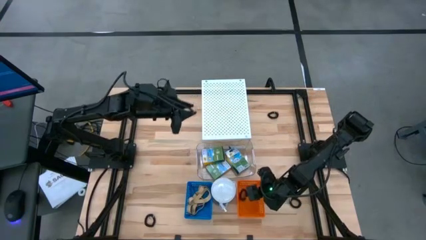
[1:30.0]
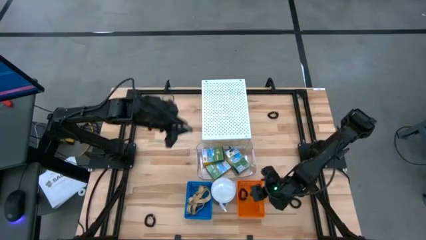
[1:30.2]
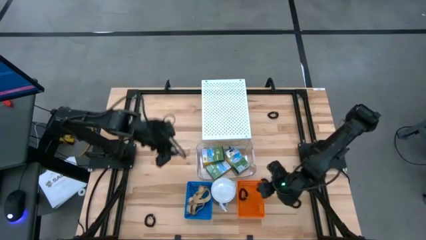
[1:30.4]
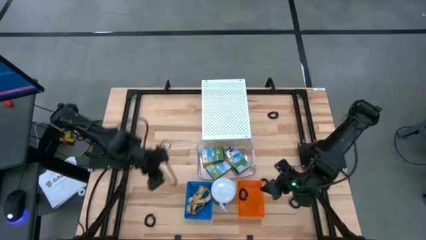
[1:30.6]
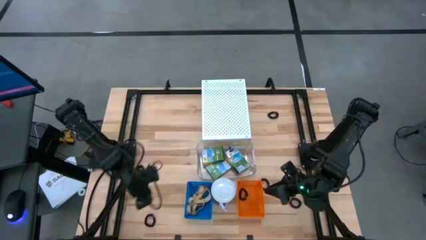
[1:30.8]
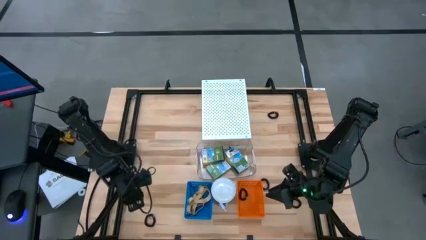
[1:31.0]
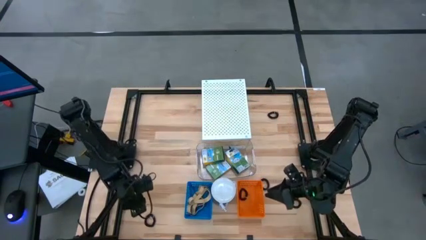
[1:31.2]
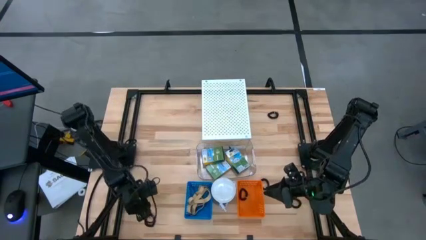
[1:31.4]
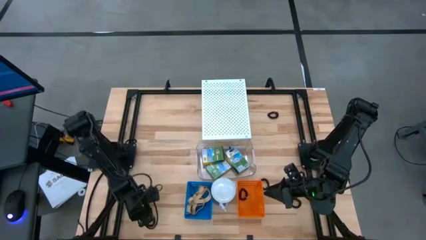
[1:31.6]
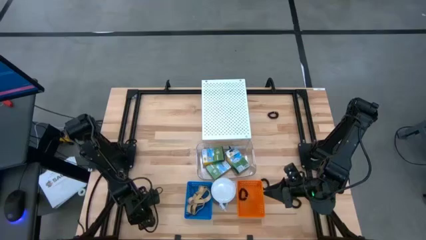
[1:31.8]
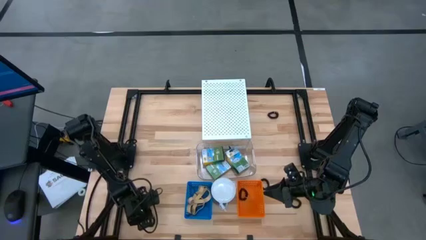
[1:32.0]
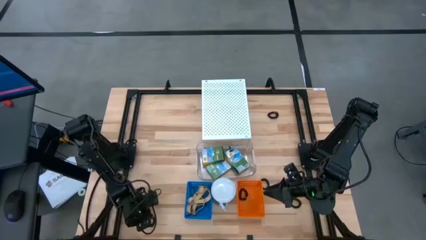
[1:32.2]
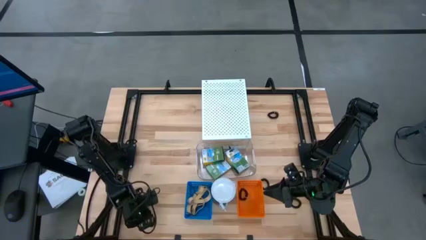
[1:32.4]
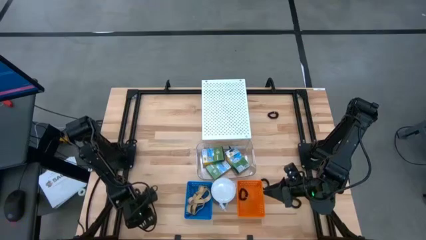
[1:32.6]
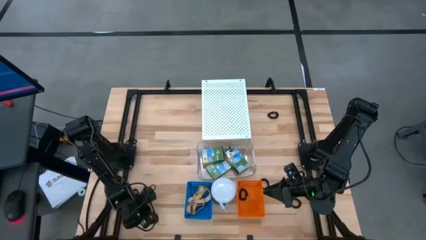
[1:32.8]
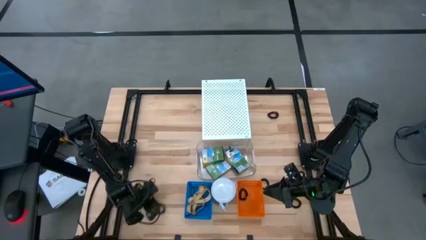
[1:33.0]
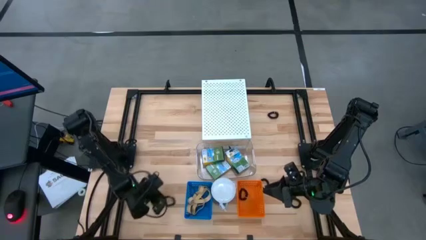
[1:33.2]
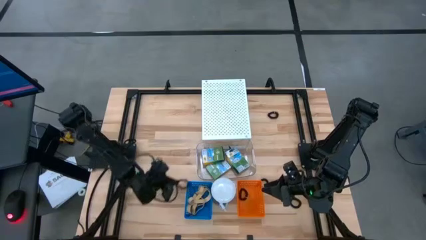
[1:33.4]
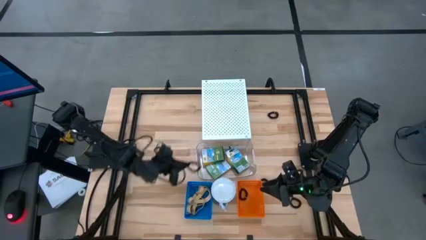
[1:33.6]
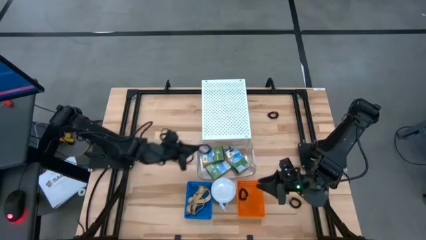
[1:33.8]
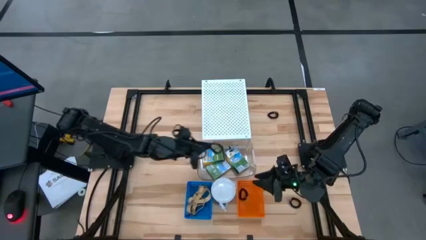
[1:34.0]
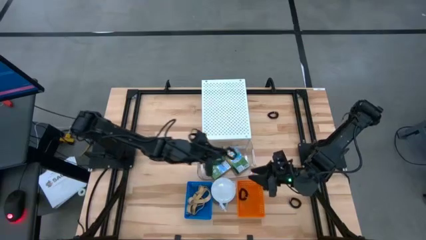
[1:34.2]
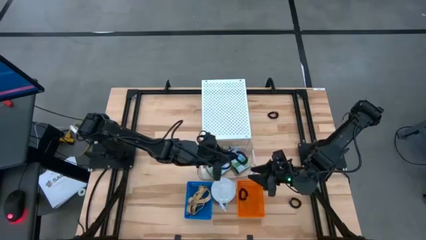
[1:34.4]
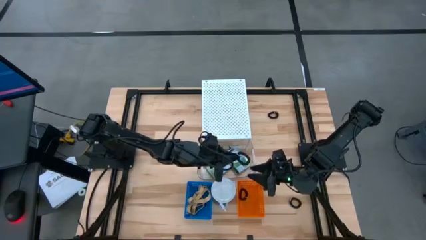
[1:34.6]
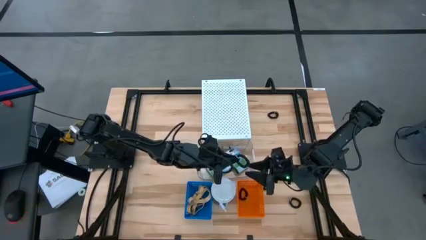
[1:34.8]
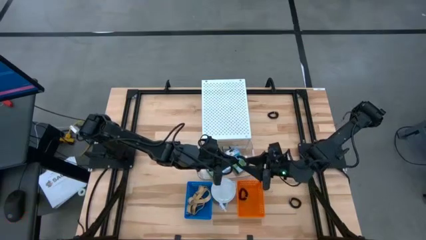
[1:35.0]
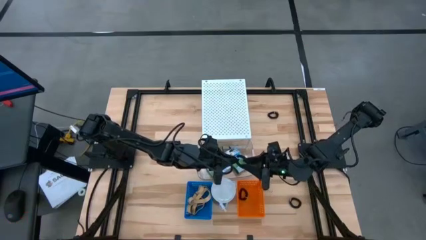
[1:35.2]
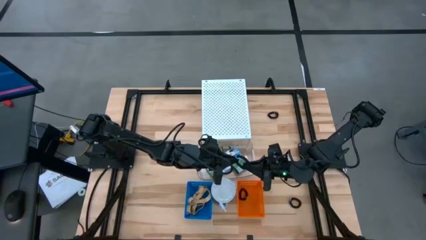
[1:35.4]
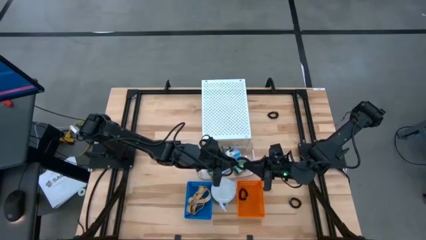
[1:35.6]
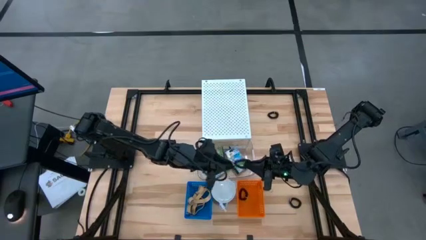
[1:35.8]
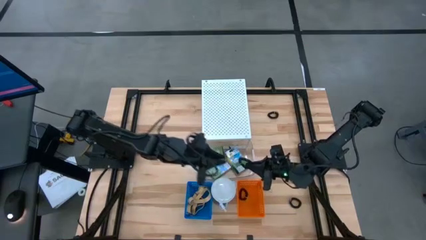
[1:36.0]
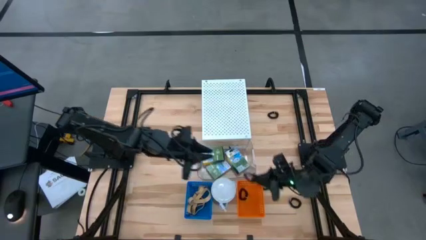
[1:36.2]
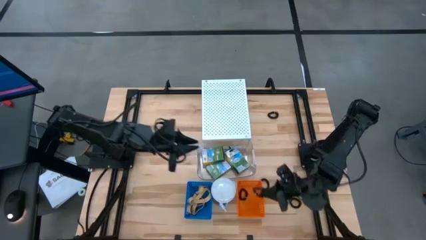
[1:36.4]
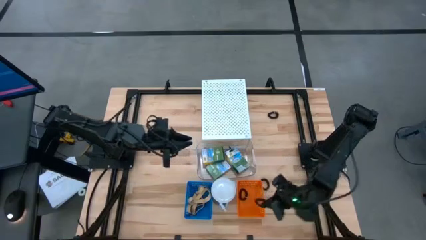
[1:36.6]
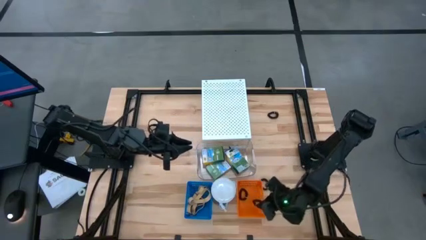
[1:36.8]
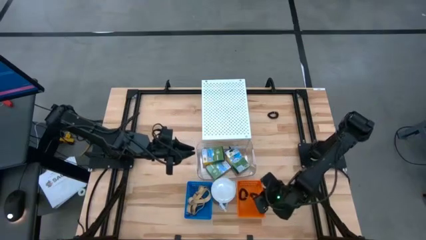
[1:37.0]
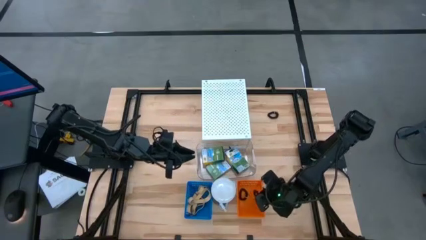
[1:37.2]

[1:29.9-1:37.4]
Task: Pick & Place Office Desk Supplies
Put the black spring keychain into the orange bin

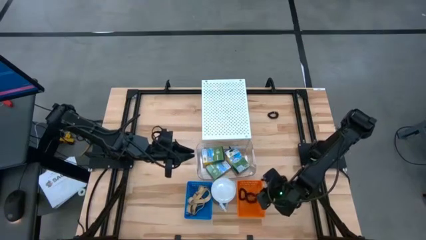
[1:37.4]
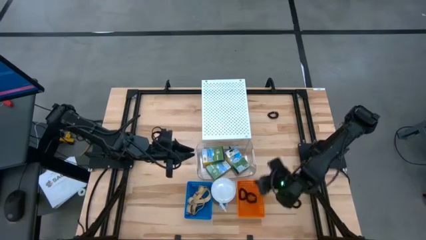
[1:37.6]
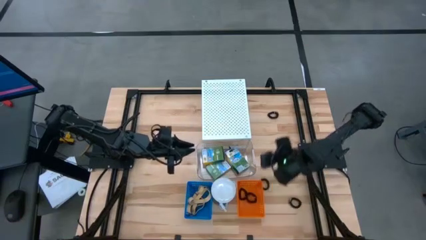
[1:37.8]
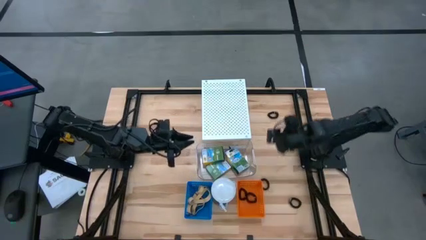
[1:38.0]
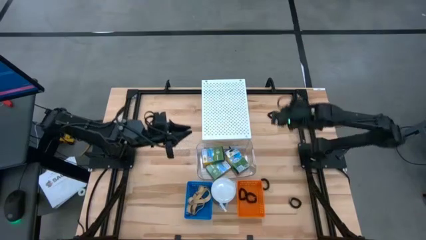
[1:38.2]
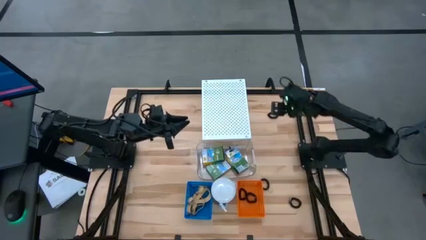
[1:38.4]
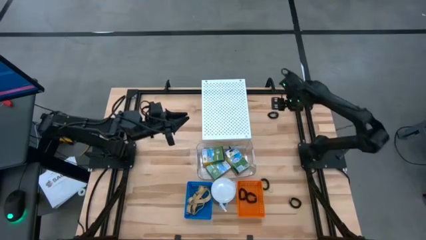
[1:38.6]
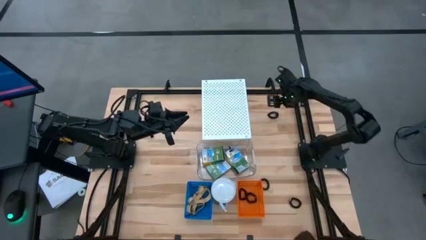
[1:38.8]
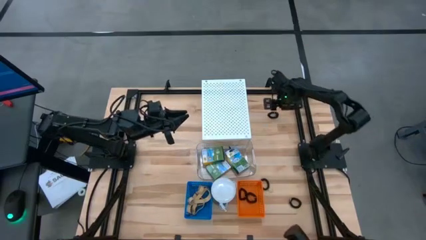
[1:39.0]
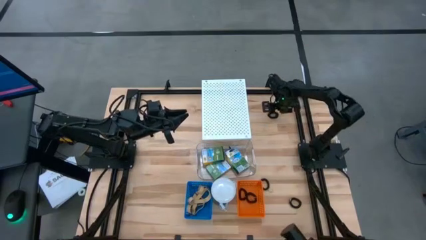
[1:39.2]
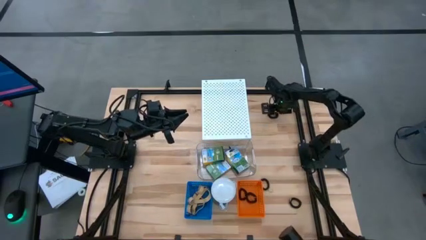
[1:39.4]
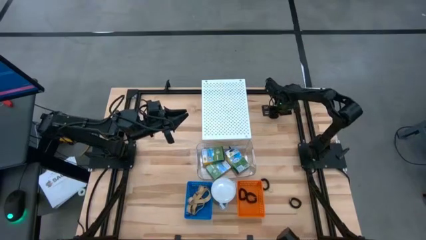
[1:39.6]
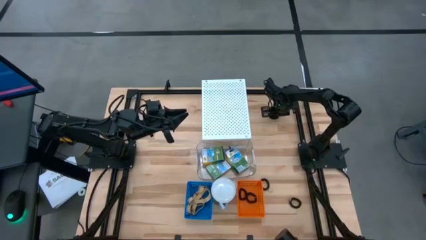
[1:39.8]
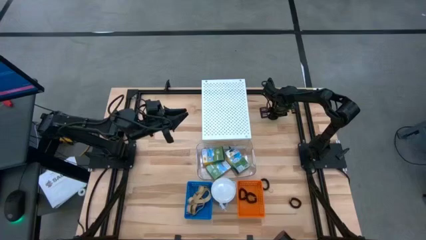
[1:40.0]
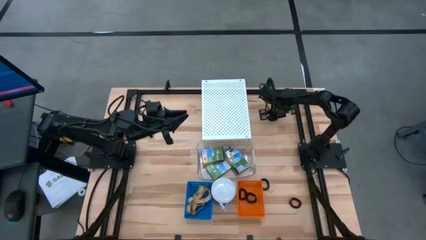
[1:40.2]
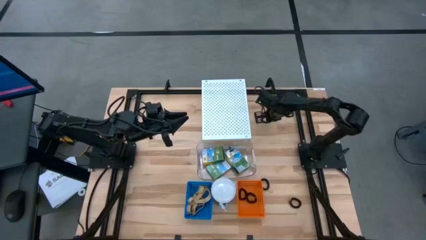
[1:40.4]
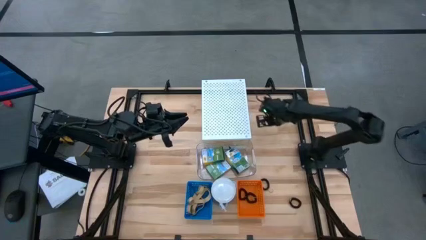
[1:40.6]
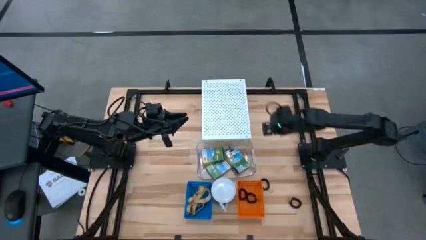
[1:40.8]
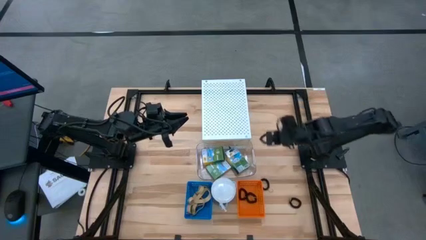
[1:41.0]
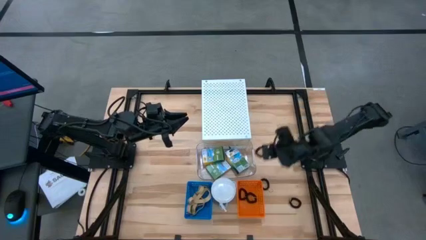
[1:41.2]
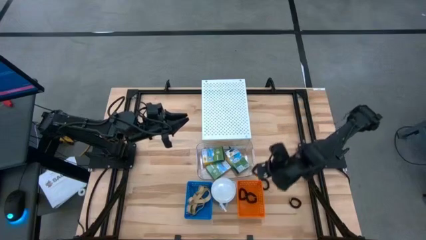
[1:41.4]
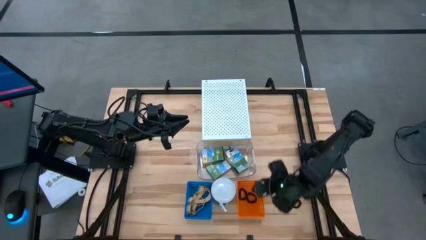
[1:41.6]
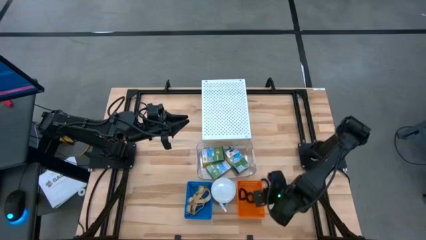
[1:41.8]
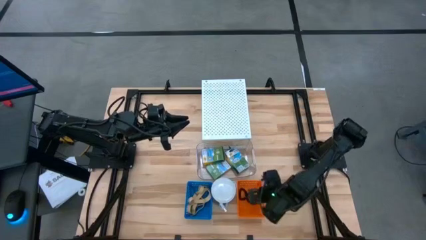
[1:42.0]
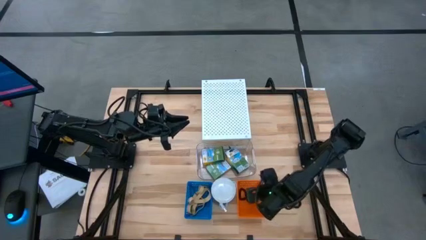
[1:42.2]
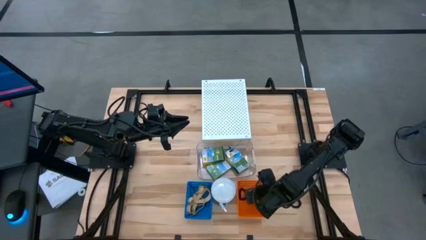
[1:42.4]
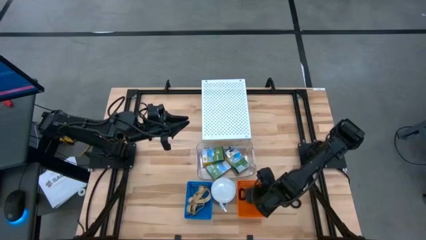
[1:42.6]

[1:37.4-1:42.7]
Put the black spring keychain into the orange bin

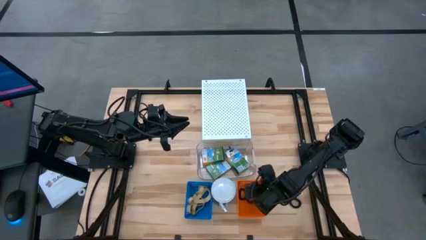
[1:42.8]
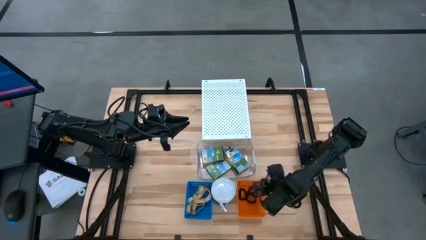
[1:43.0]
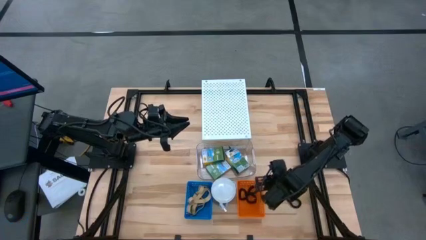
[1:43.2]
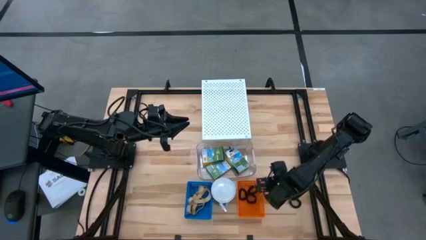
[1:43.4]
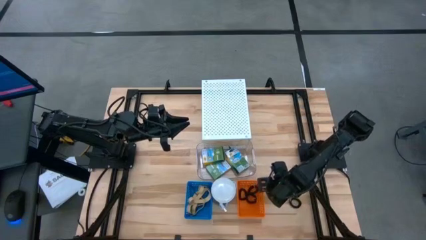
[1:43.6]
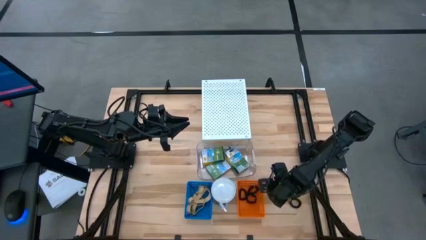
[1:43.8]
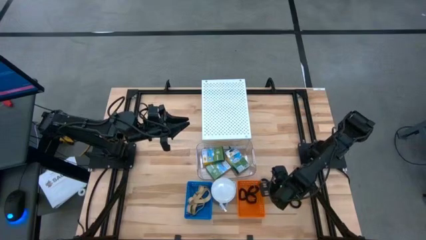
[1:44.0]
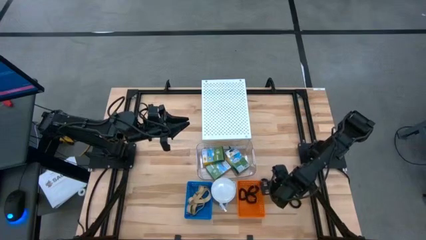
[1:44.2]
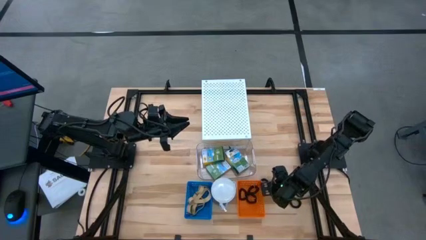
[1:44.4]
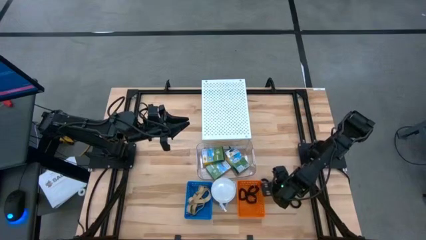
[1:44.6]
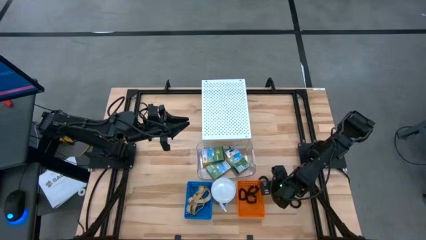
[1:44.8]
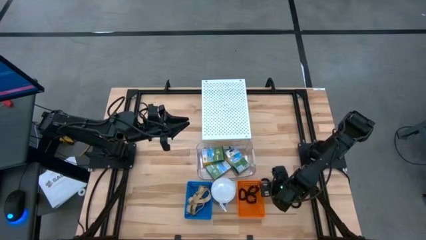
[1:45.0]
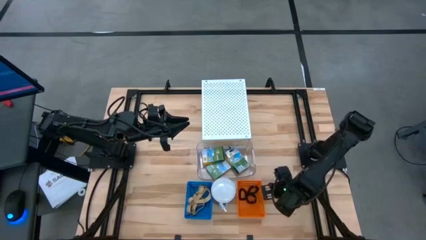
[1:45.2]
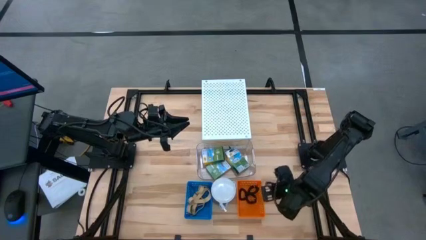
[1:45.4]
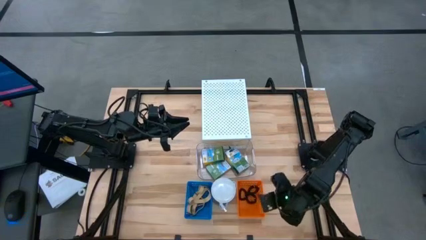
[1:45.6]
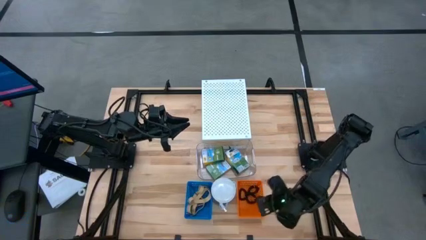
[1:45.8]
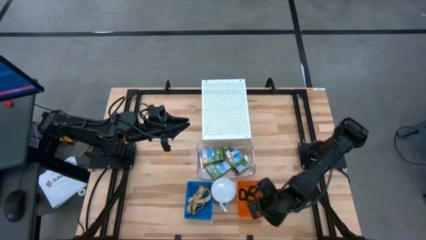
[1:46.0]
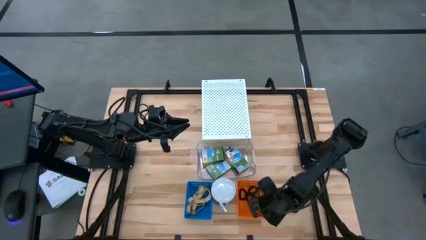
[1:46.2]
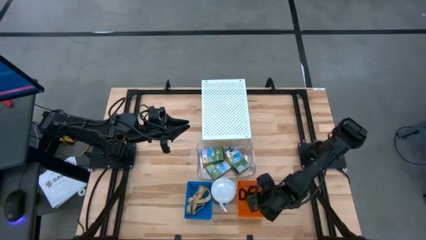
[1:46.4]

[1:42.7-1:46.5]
Put the black spring keychain into the orange bin
